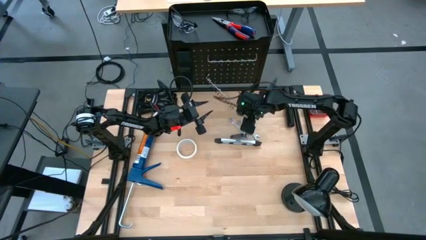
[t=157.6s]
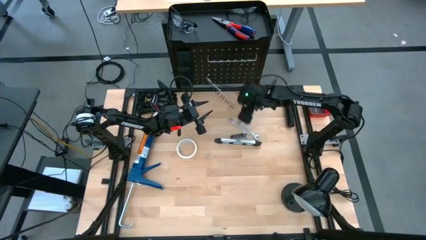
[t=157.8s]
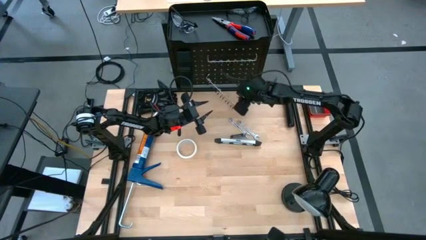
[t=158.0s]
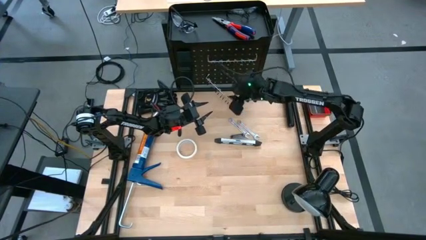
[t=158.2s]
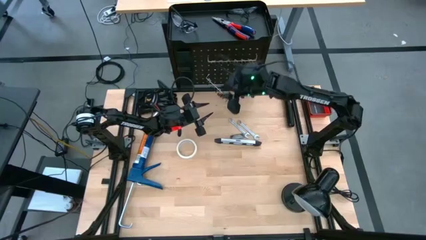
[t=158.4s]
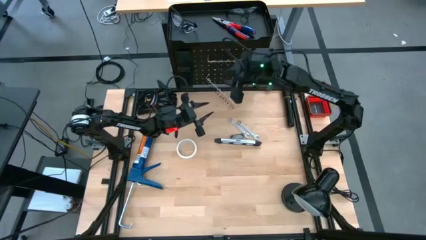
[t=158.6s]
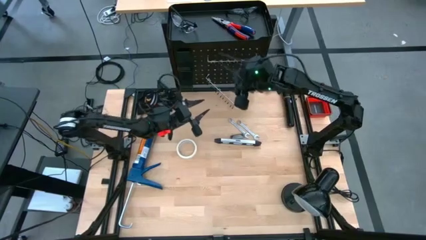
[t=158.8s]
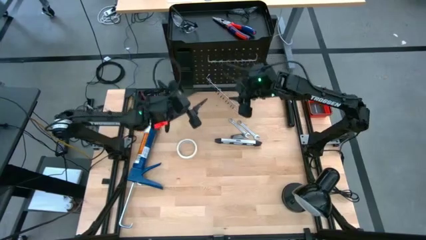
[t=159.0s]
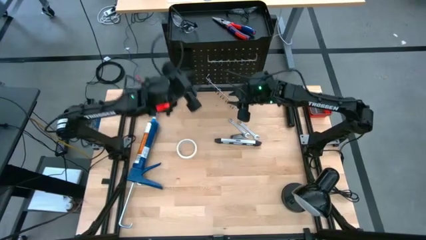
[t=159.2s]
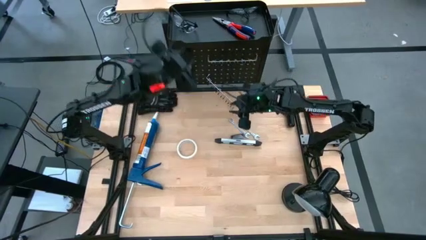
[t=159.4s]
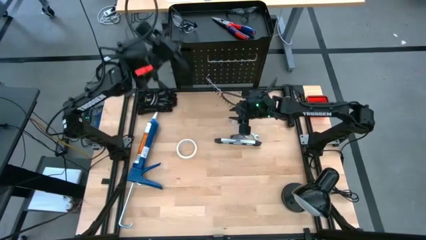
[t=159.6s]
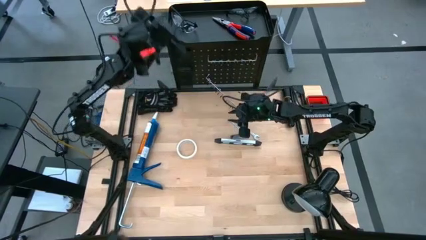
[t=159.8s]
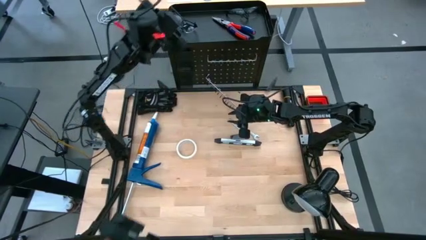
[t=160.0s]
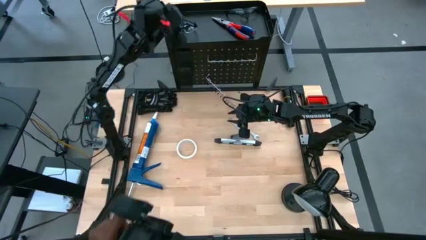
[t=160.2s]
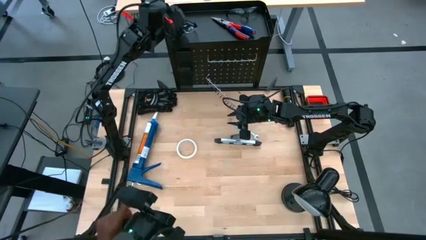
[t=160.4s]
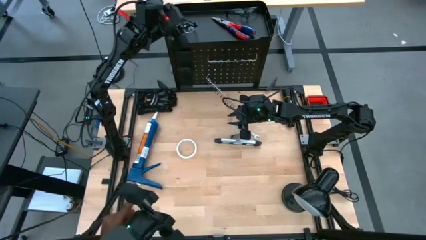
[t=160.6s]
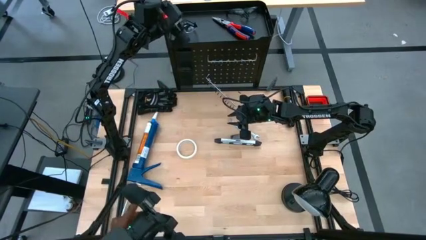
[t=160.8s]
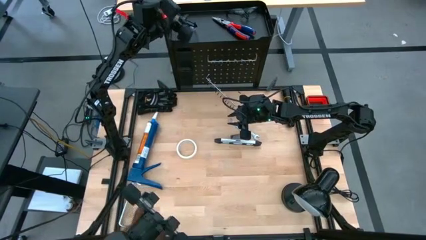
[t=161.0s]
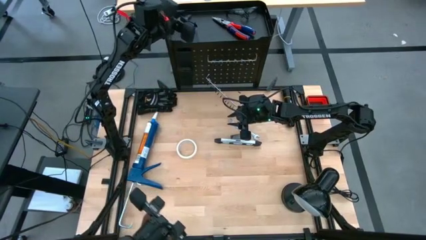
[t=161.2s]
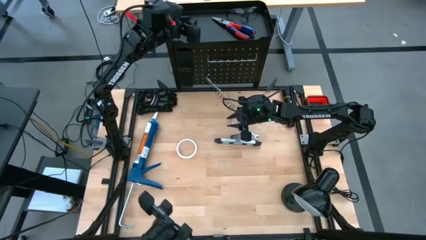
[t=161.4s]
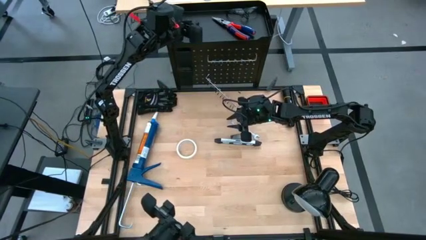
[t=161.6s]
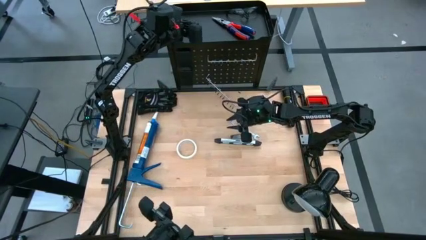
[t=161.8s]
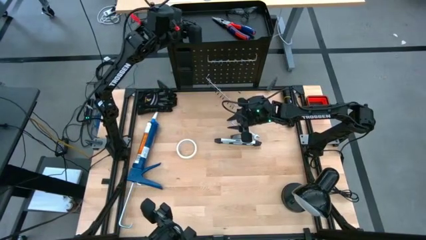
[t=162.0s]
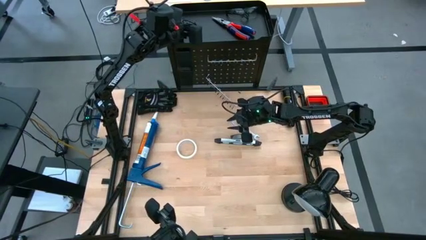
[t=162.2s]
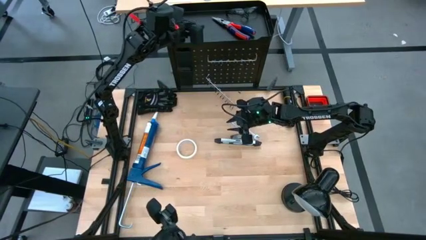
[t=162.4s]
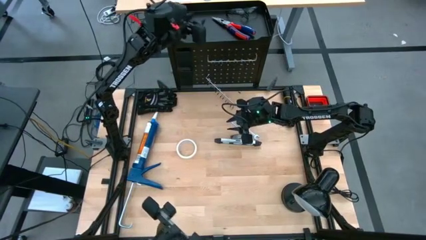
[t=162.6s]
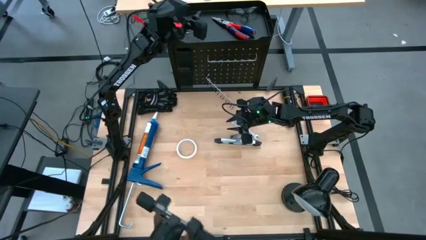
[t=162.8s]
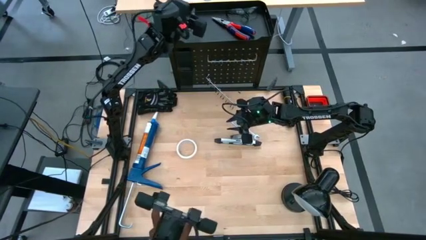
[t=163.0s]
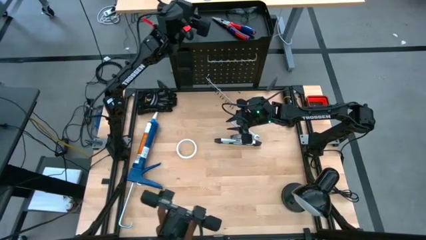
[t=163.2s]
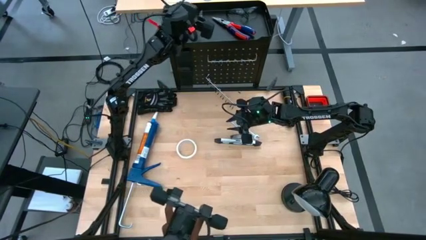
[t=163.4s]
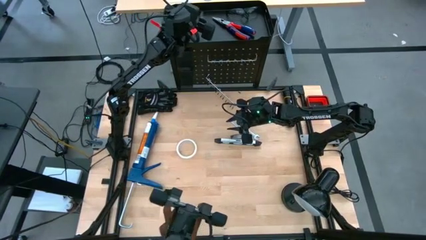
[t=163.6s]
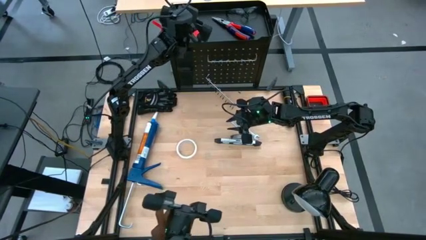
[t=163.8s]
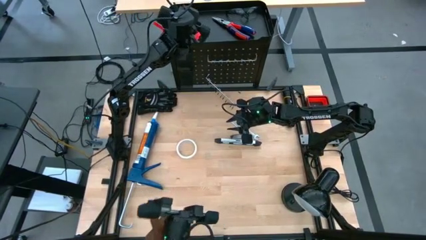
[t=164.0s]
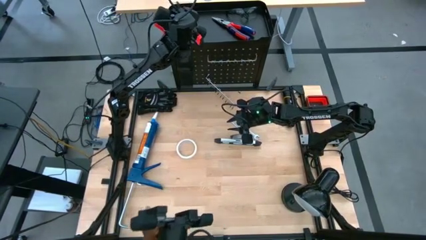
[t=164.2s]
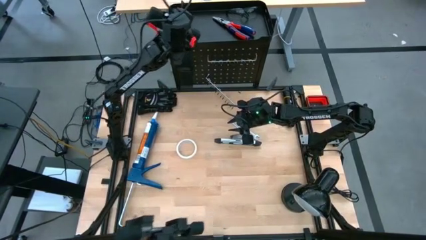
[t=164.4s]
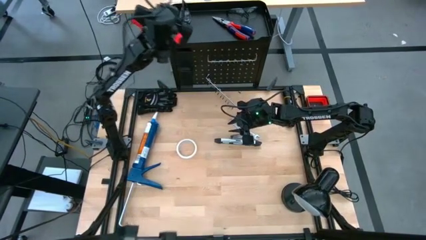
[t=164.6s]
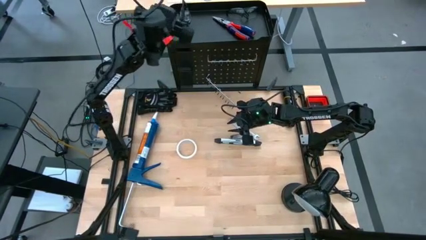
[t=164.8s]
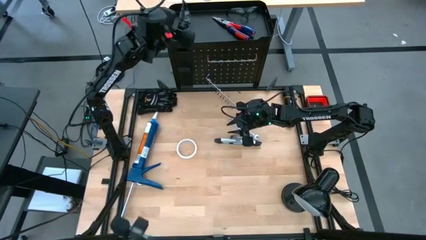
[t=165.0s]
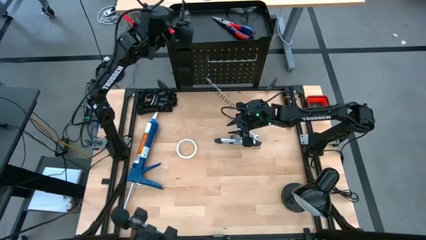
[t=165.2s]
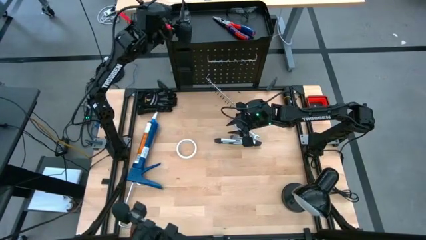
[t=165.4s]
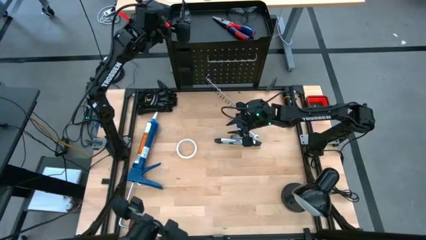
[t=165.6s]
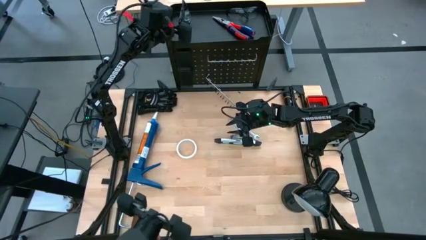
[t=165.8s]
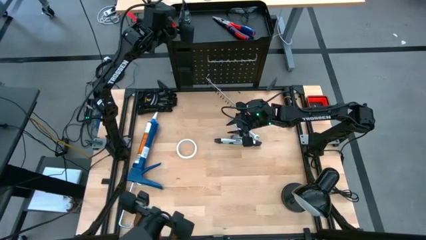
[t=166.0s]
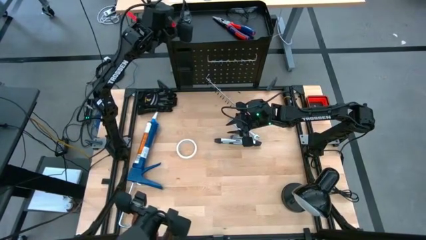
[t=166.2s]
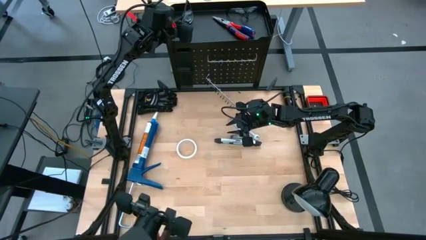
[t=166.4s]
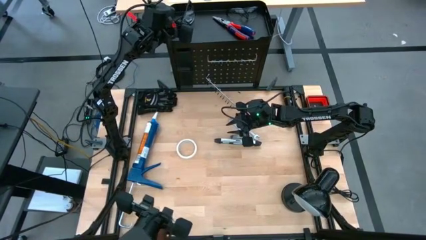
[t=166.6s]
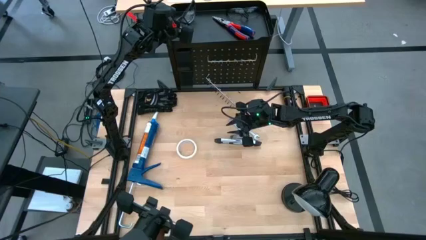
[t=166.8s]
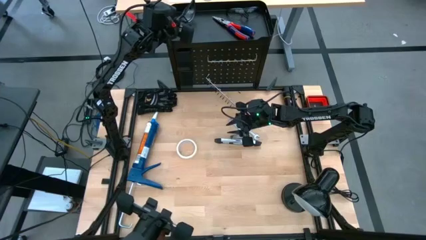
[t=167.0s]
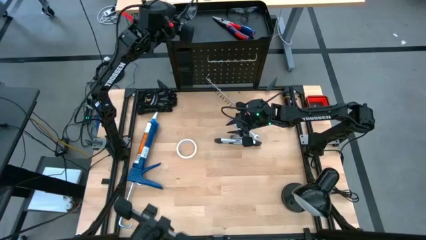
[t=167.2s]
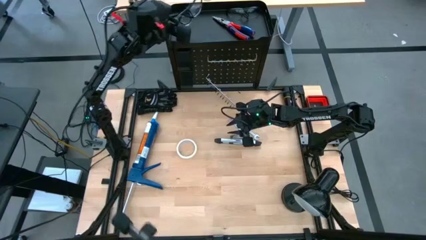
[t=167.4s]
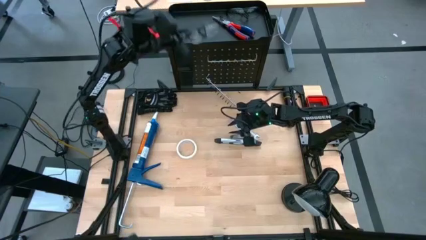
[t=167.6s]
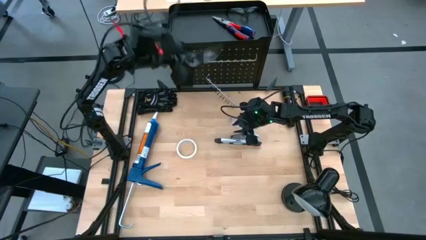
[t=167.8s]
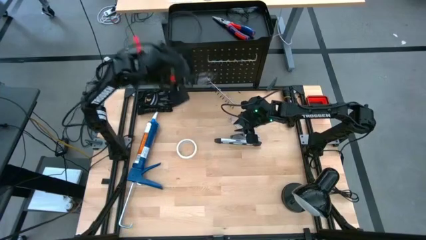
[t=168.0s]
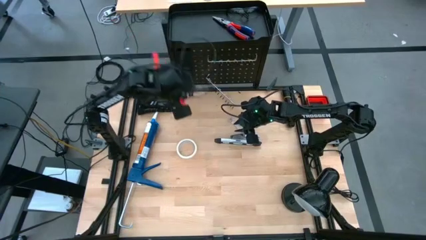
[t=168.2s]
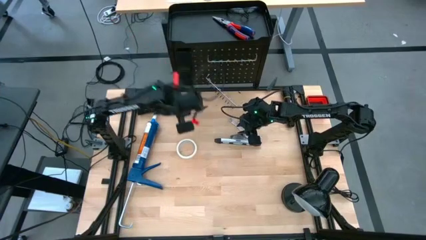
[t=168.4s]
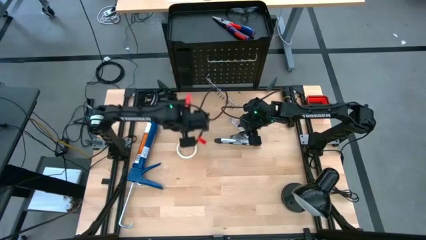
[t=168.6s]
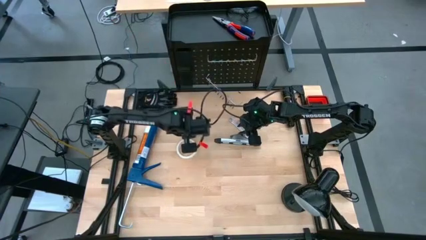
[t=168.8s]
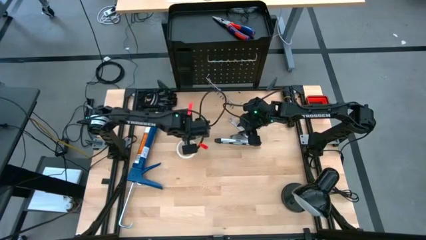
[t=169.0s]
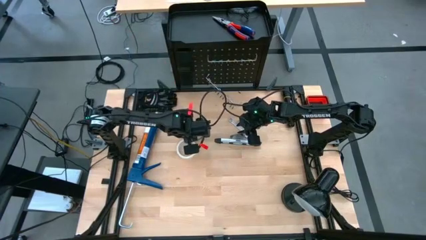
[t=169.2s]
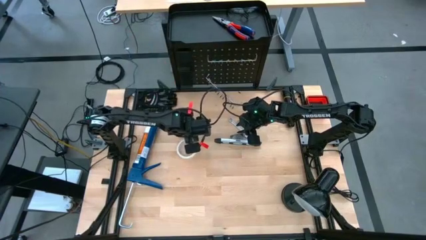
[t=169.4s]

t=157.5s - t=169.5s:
Task: Hang tools onto peg board
Remove the left safety goggles from the peg board bin

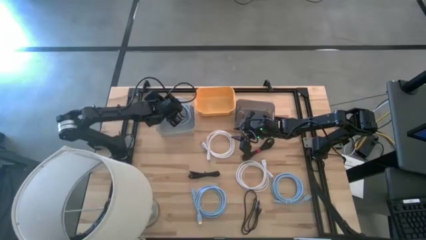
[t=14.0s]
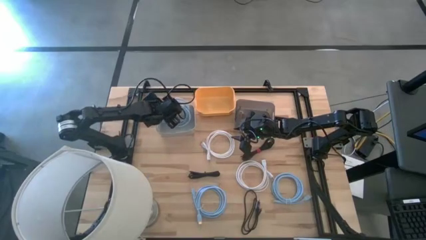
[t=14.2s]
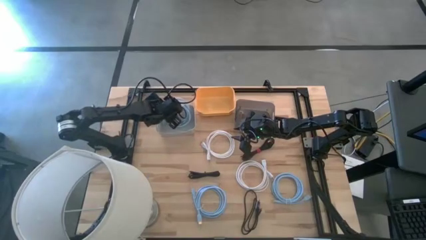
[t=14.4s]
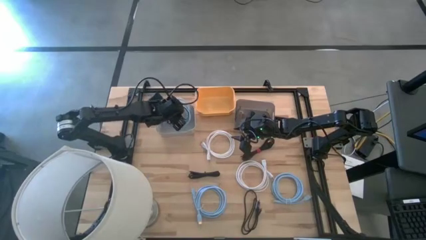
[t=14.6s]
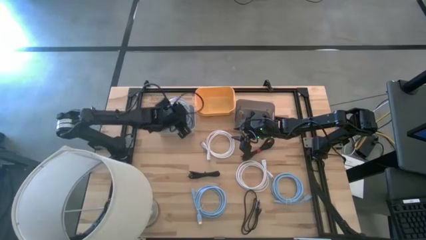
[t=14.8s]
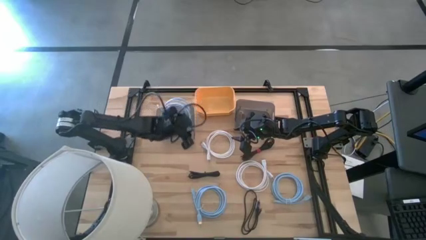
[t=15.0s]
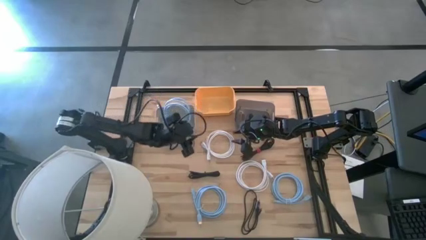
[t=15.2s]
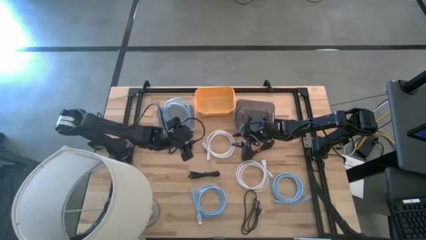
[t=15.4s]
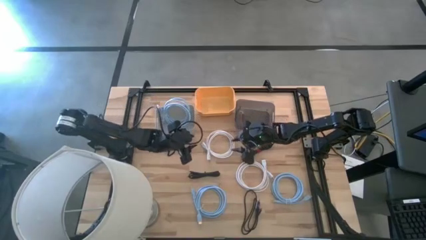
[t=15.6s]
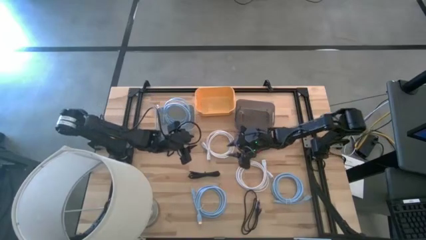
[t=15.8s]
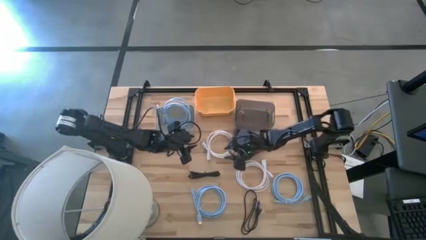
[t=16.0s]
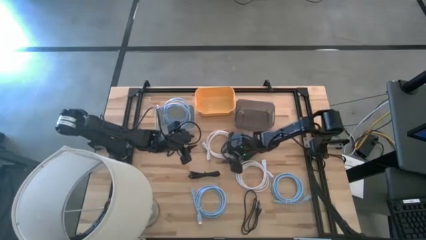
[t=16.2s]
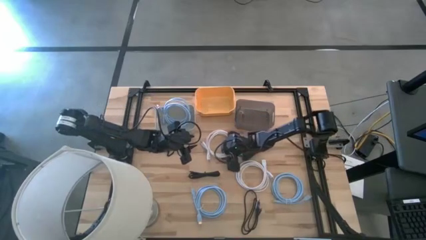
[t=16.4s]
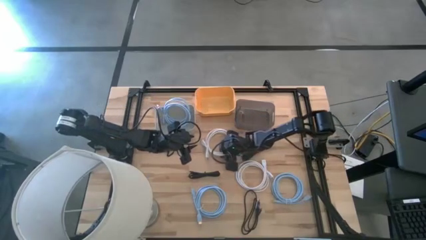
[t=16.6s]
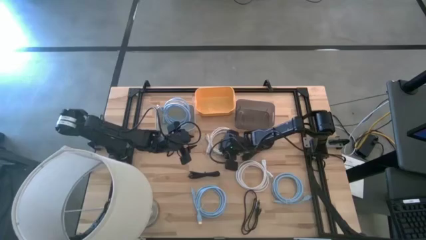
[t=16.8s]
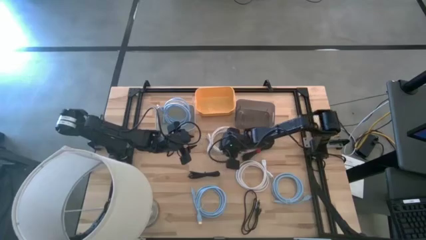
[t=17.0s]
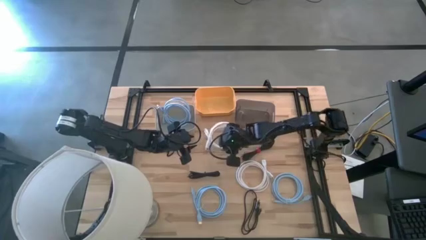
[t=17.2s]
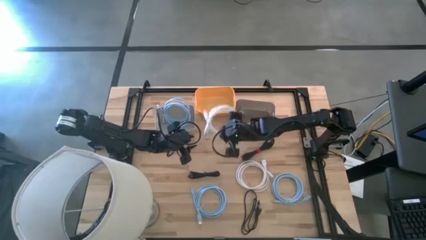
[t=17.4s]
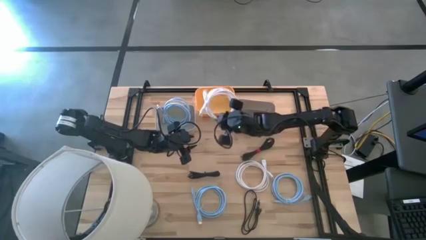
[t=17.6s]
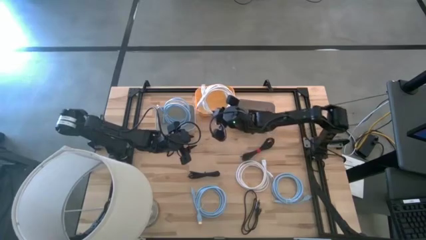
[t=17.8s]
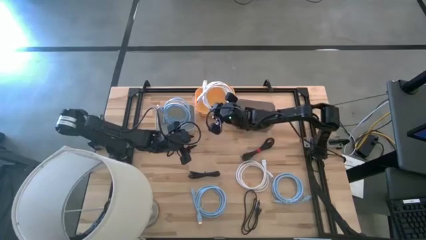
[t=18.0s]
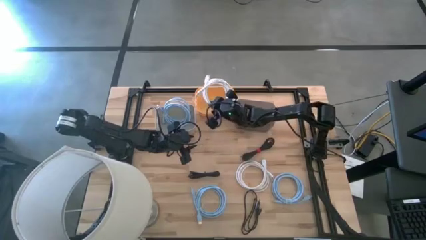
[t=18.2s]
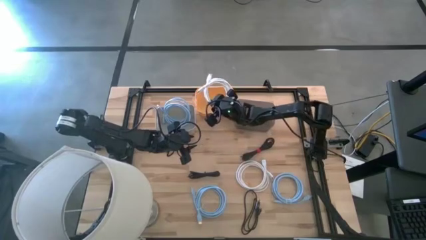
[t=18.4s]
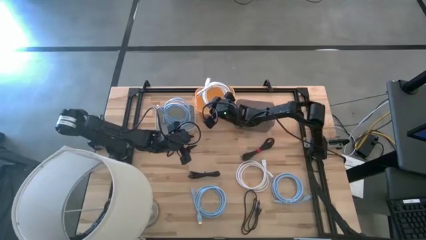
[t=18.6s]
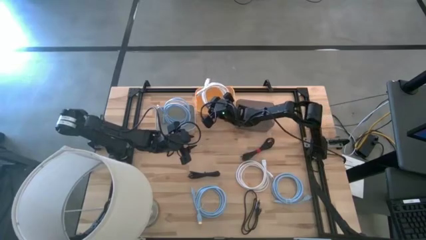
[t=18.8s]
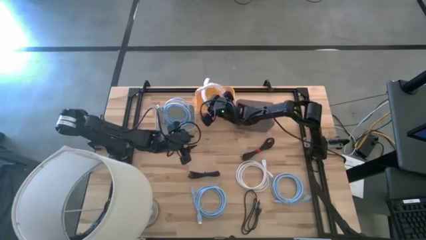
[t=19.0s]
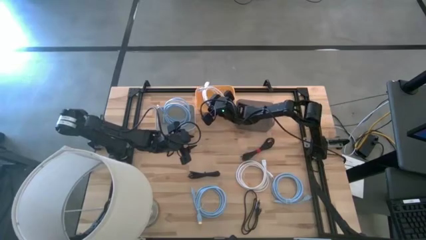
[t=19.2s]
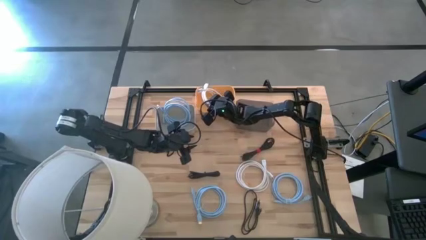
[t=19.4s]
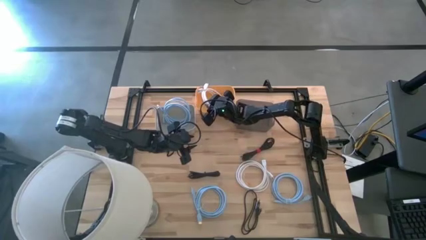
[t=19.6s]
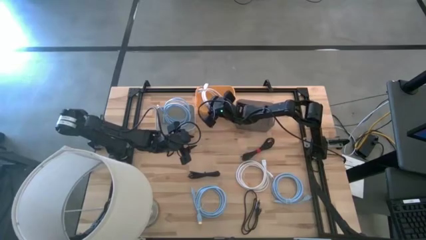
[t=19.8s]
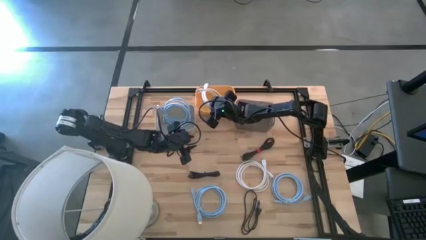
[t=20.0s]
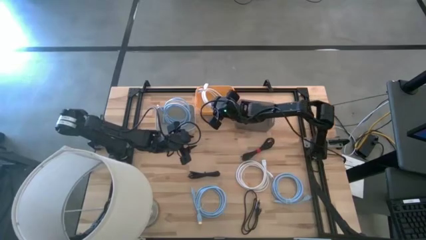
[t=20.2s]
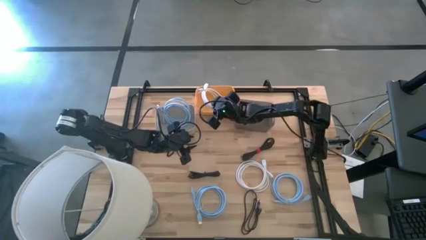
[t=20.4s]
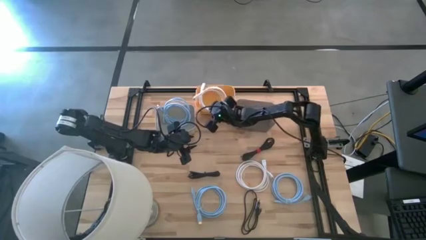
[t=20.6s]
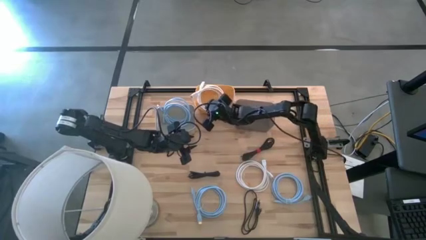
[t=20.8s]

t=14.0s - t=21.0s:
Task: Pick & Place USB Port
Put the top white hdmi cable into the yellow bin
